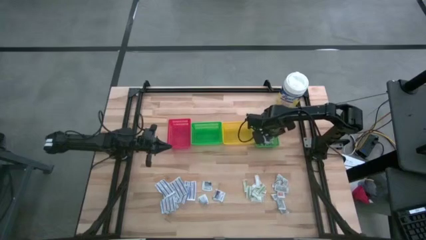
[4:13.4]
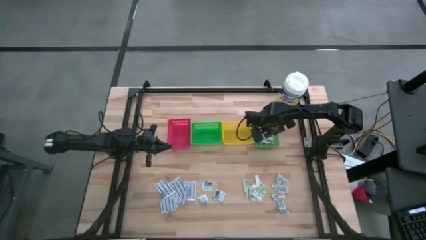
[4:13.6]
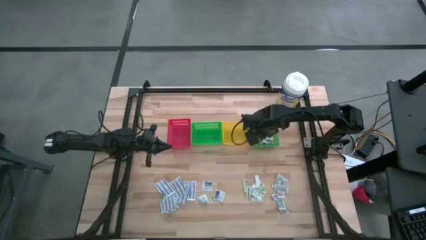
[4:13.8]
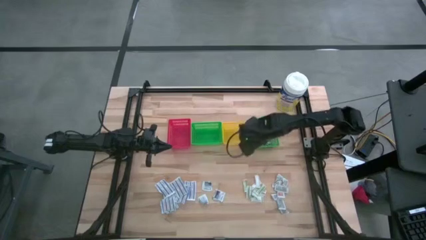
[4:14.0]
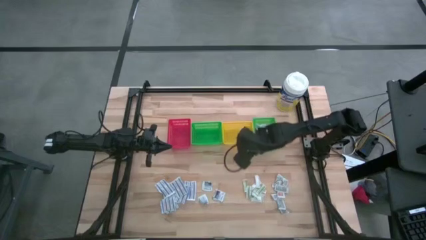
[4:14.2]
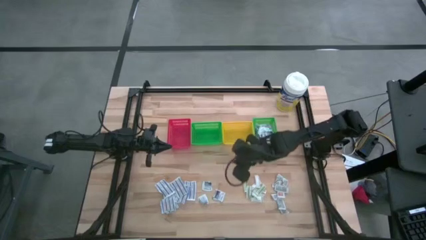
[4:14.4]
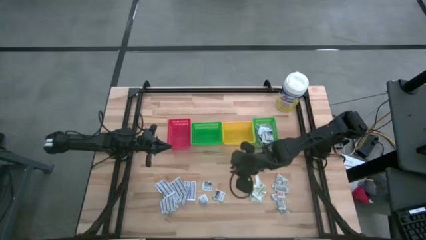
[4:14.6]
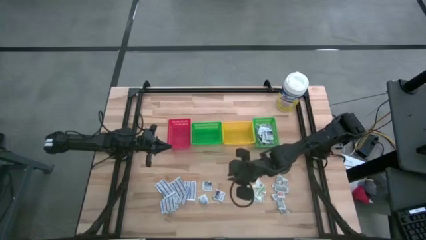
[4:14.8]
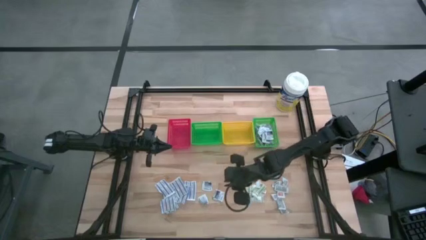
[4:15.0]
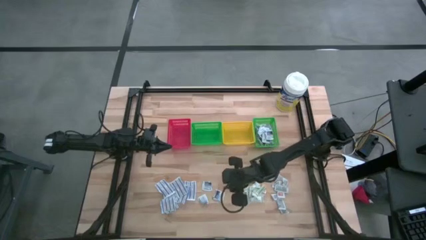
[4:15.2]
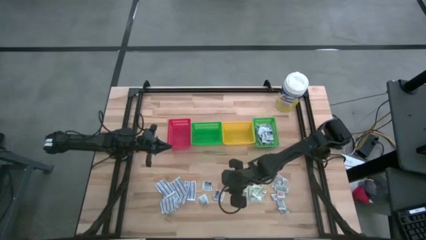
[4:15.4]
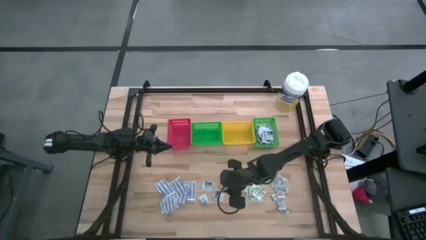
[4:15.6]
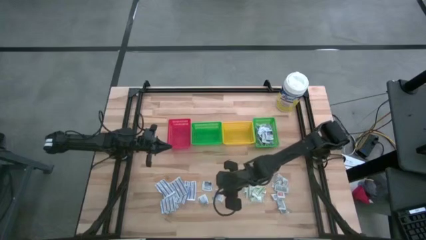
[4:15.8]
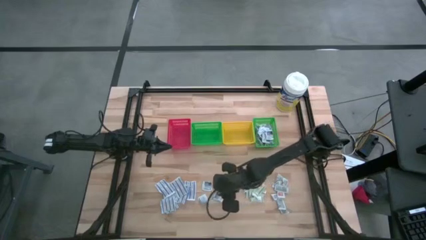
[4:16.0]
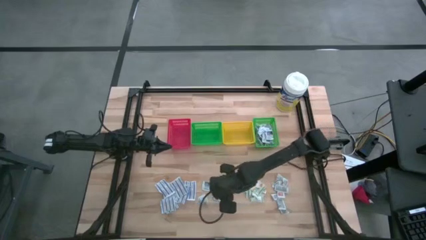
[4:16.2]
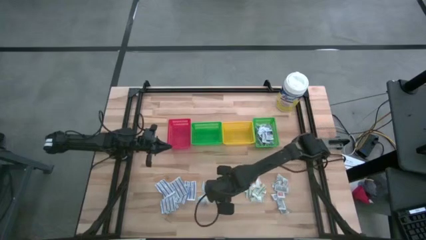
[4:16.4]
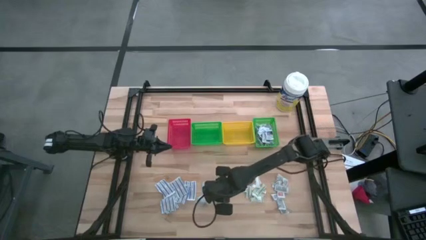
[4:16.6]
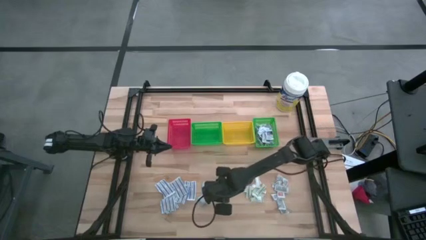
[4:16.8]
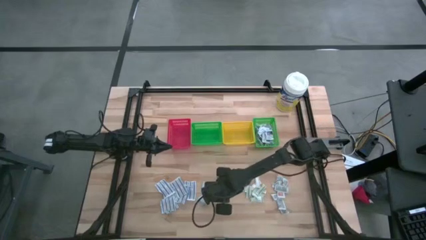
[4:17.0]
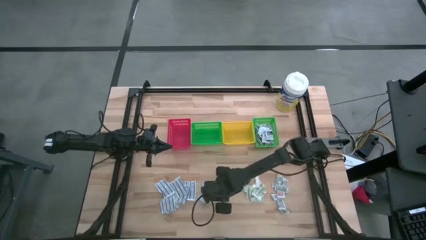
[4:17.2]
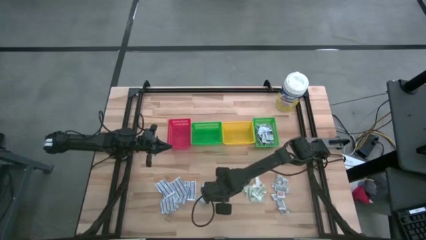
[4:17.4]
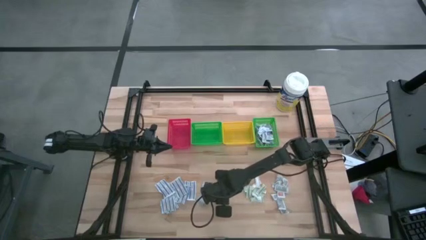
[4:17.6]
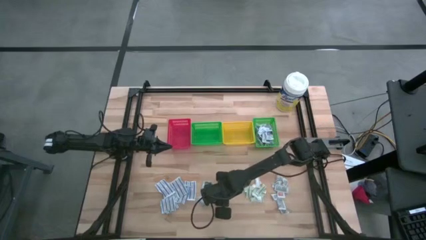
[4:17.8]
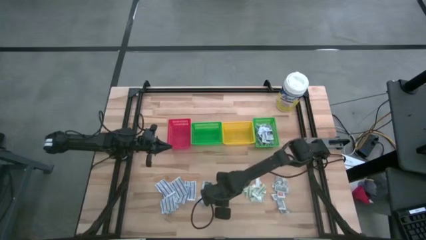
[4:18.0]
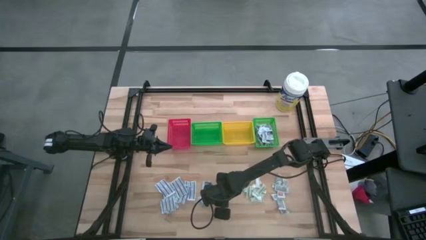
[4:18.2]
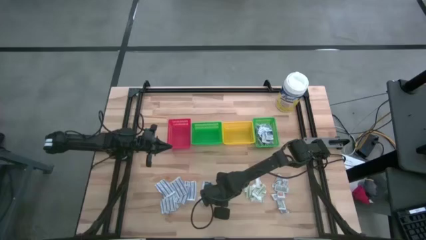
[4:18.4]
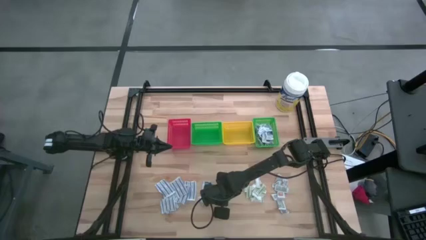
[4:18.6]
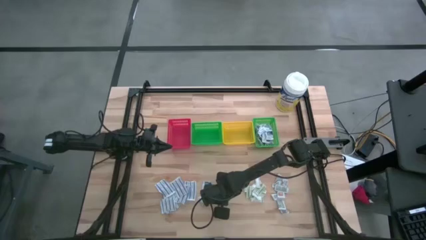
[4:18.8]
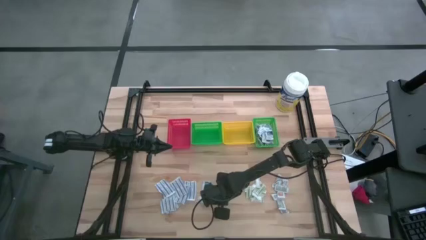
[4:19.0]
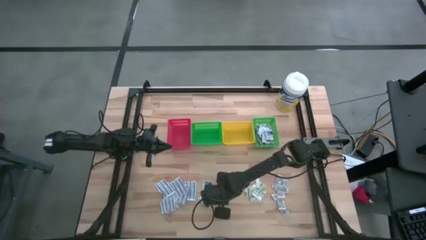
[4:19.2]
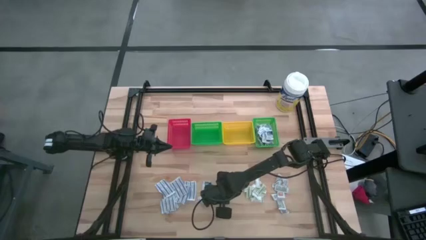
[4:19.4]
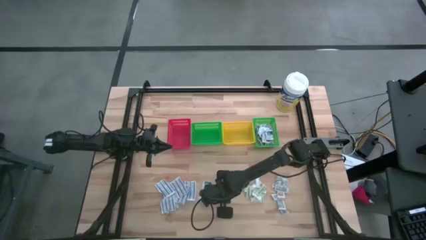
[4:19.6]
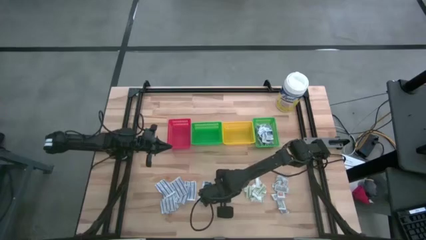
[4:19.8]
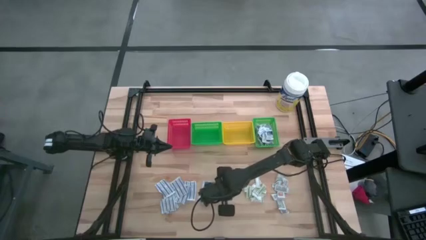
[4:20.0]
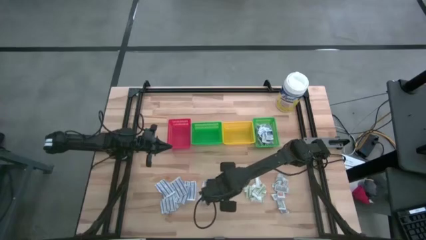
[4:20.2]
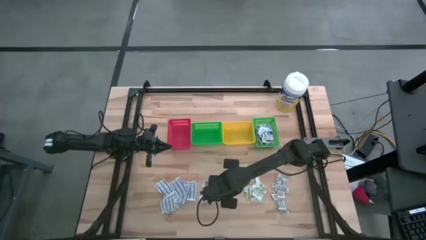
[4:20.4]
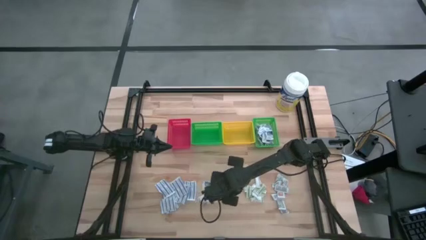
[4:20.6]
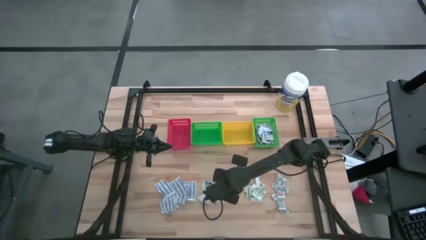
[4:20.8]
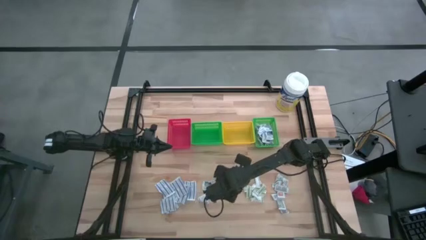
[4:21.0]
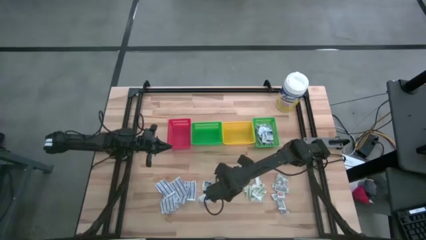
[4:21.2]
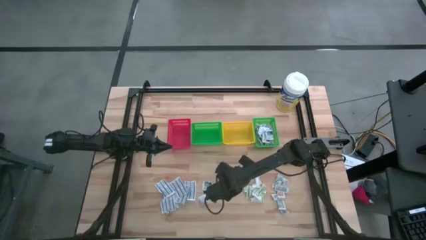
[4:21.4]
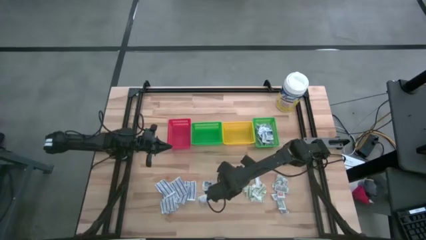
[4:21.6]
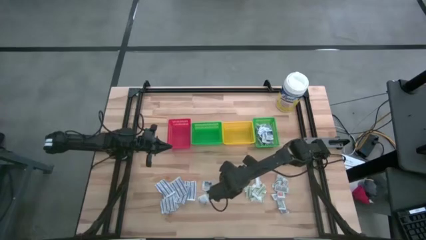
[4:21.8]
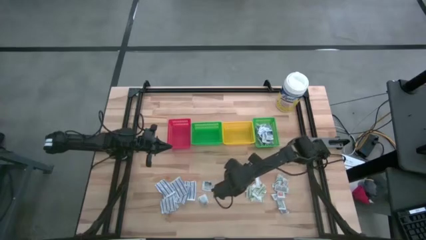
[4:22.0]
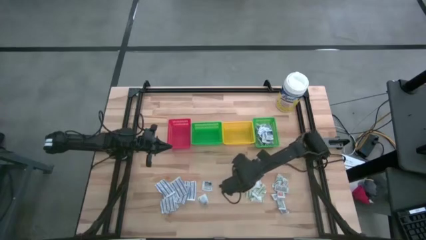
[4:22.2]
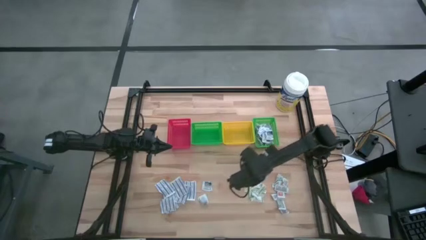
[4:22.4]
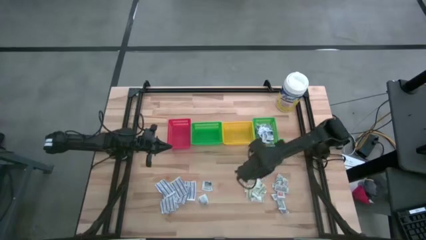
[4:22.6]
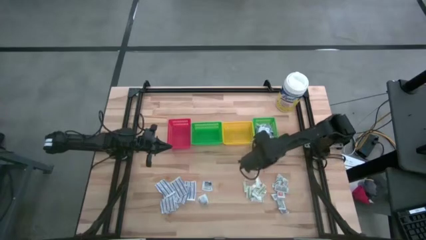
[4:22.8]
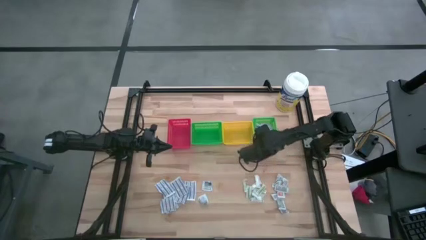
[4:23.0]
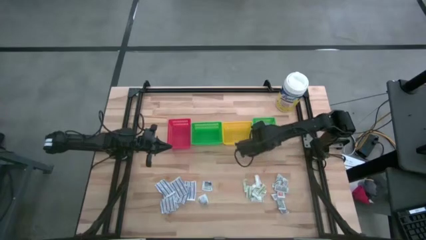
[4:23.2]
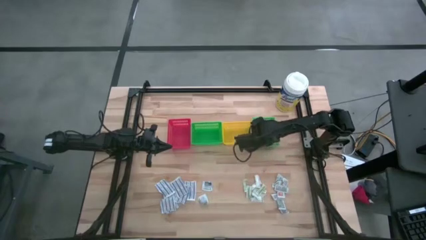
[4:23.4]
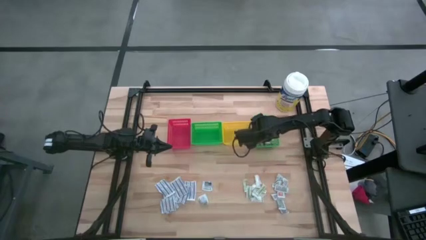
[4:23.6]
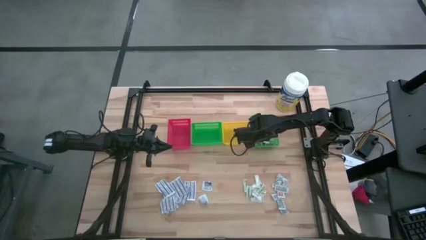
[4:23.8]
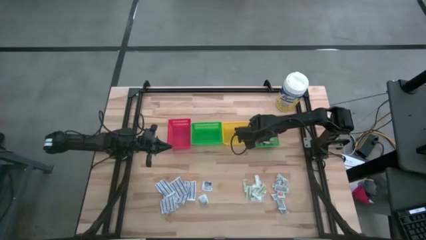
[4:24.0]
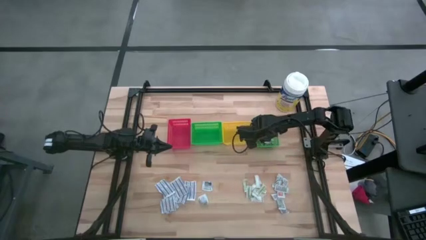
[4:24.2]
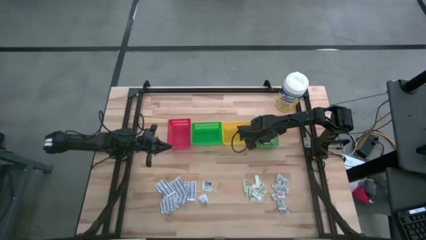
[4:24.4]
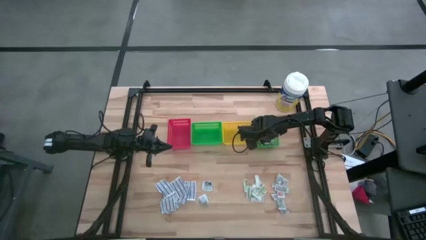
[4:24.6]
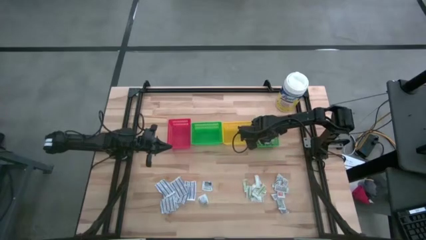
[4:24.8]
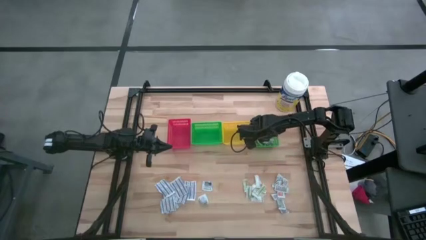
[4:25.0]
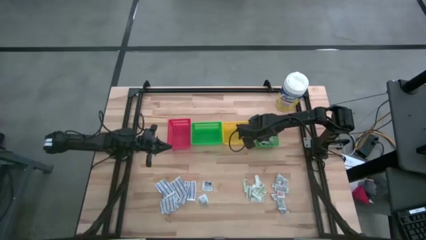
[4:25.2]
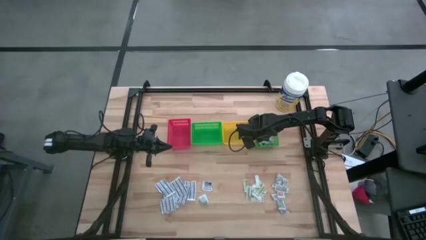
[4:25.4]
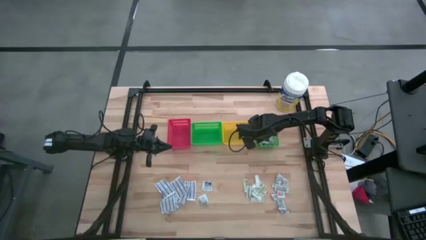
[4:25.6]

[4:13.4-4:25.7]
Task: Pick & Place First Aid Supplies
Put the blue alcohol pad into the right green bin
